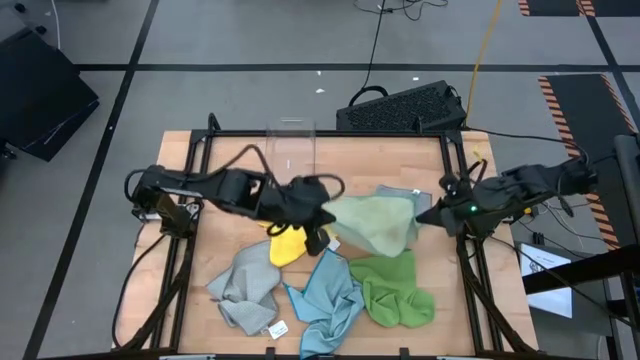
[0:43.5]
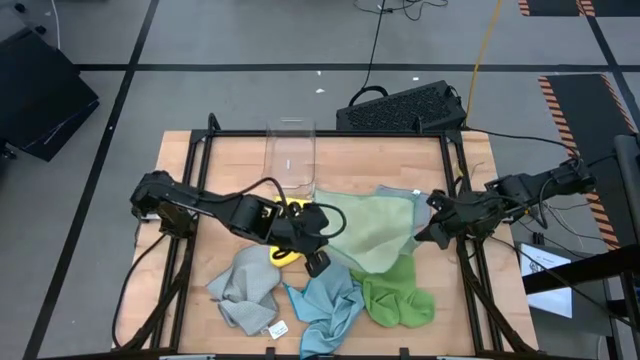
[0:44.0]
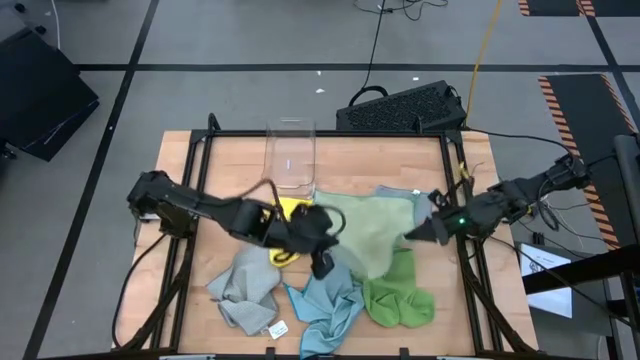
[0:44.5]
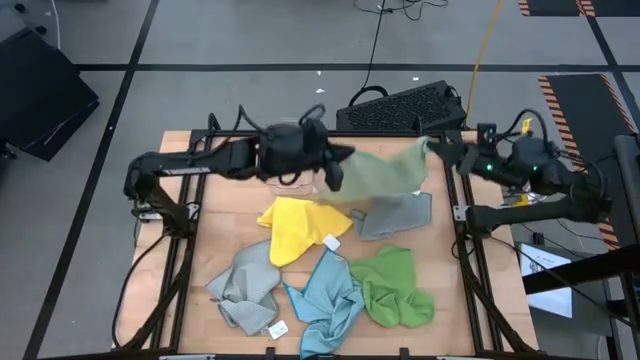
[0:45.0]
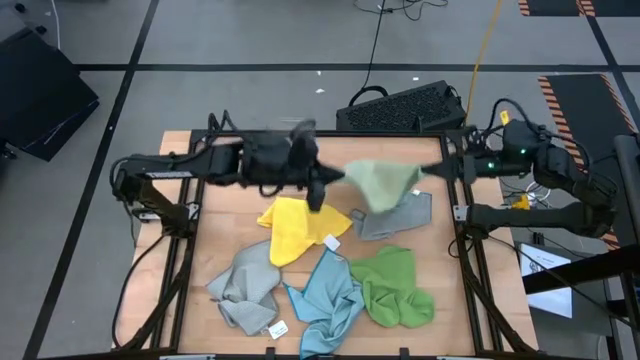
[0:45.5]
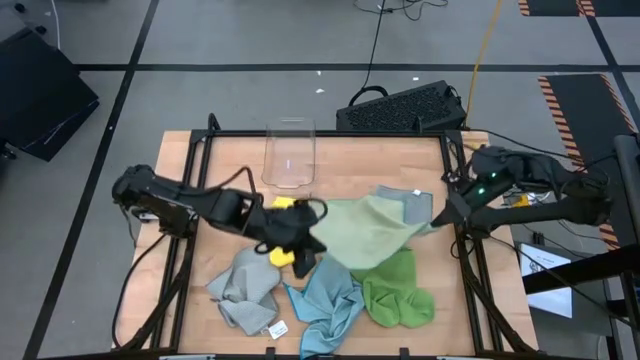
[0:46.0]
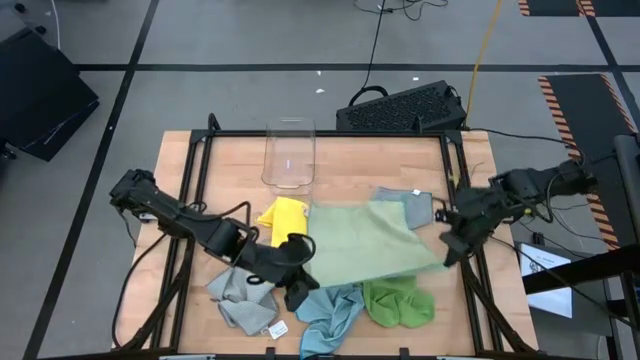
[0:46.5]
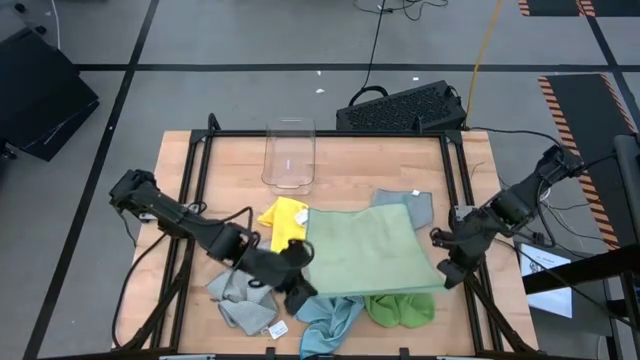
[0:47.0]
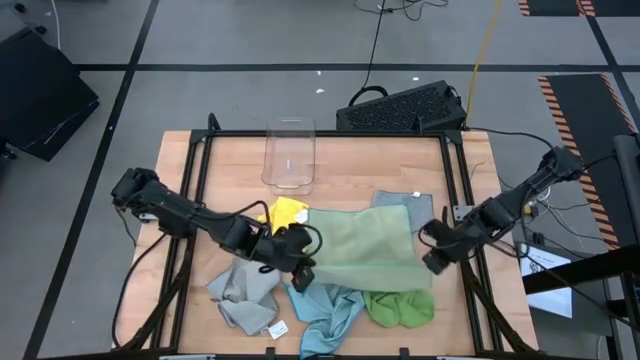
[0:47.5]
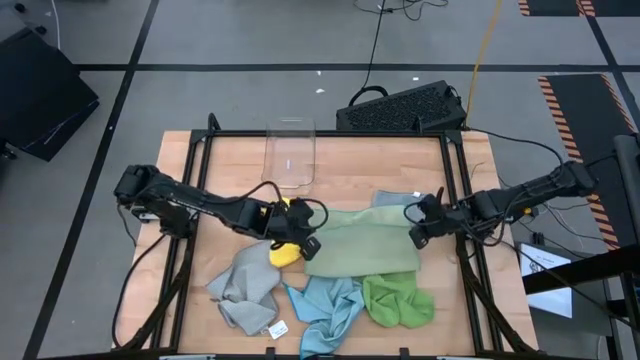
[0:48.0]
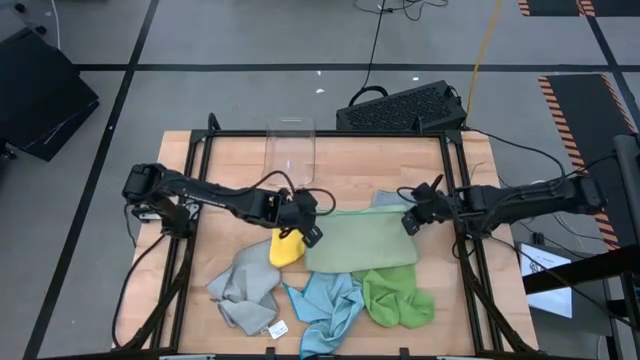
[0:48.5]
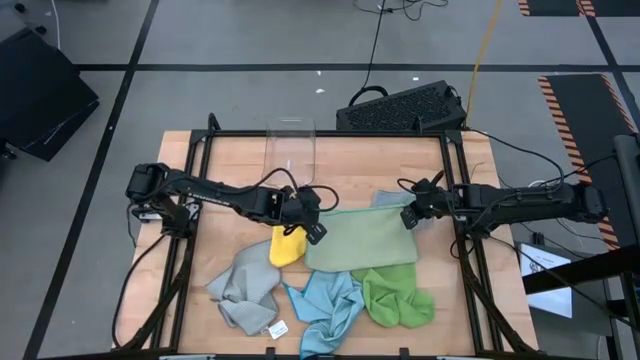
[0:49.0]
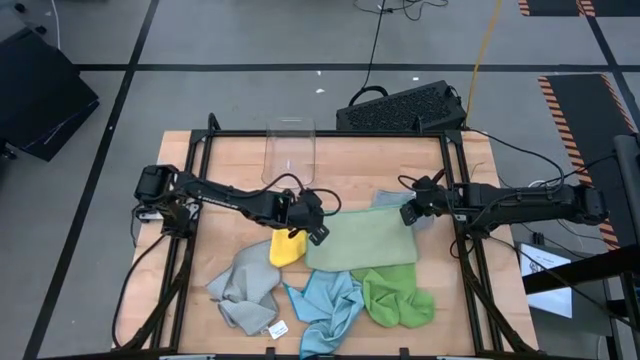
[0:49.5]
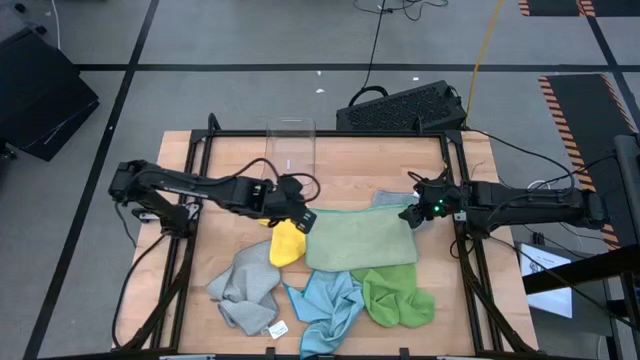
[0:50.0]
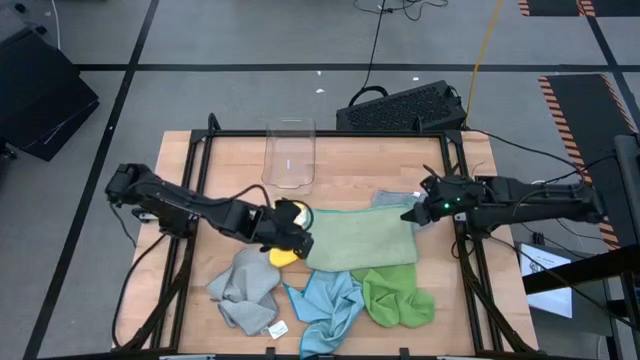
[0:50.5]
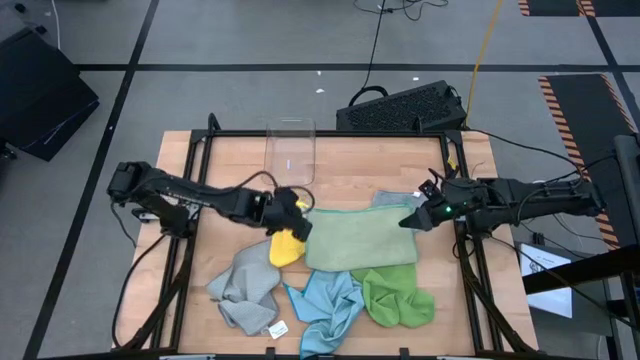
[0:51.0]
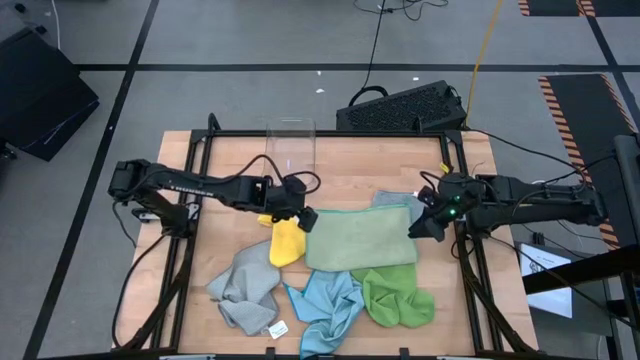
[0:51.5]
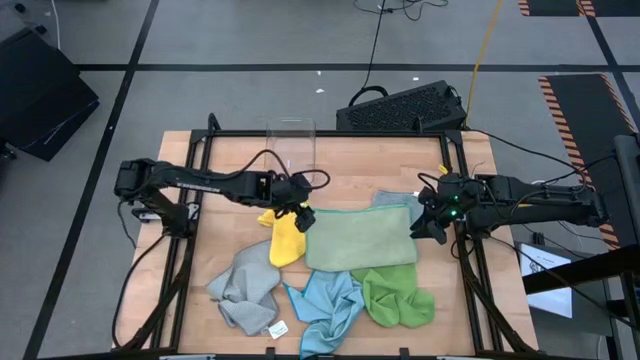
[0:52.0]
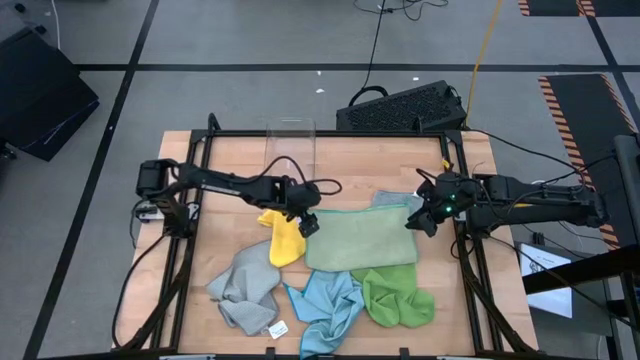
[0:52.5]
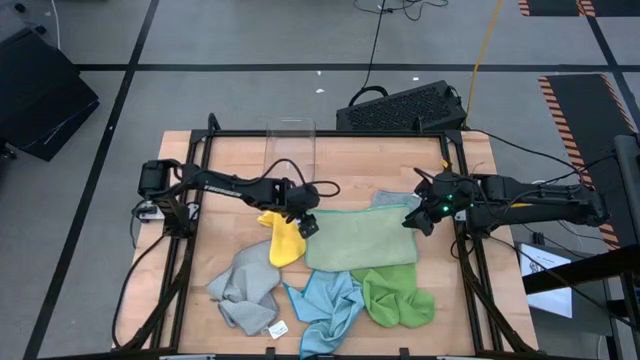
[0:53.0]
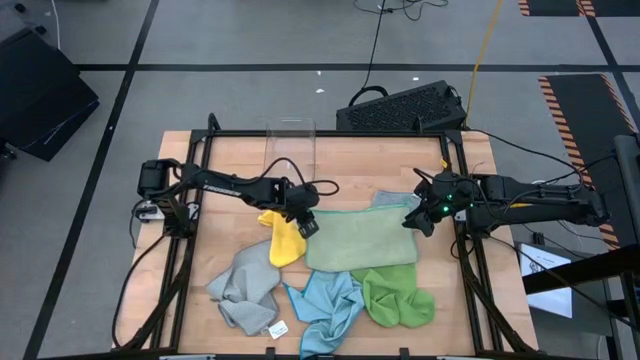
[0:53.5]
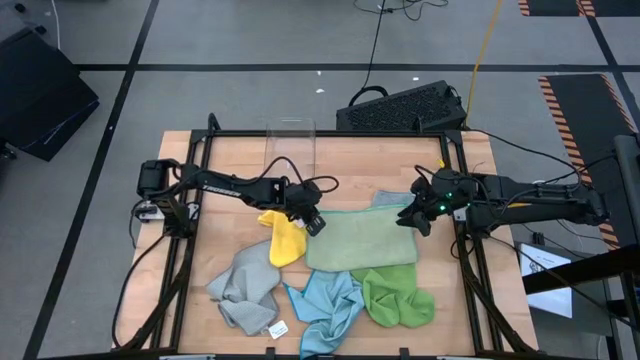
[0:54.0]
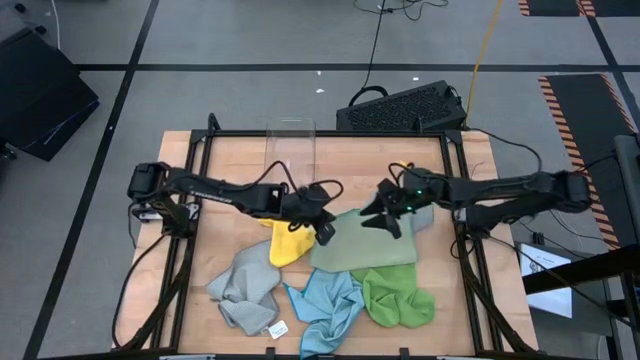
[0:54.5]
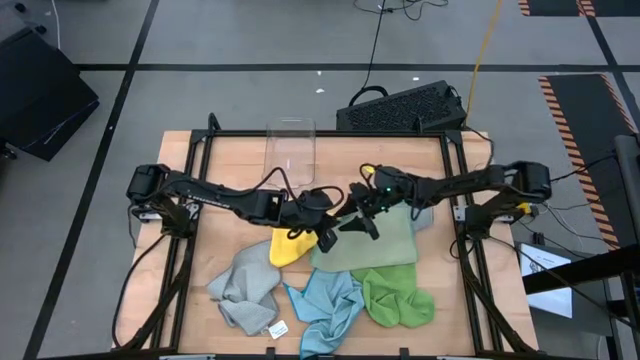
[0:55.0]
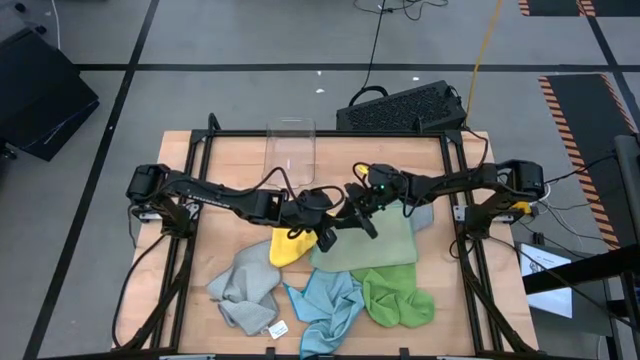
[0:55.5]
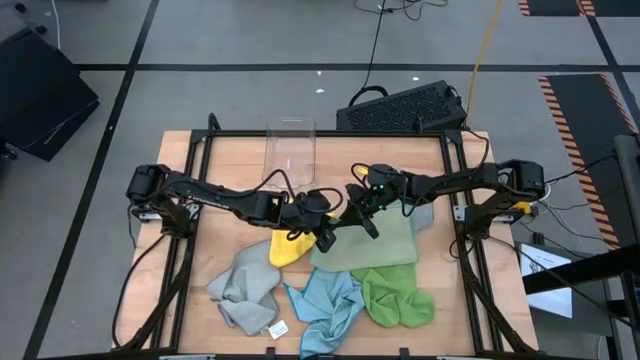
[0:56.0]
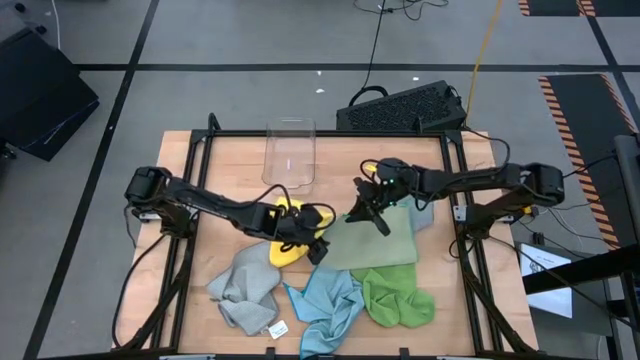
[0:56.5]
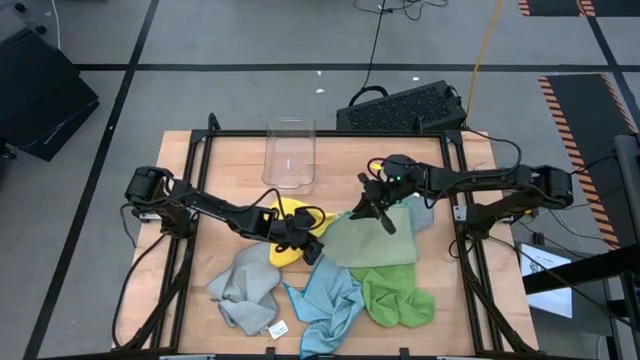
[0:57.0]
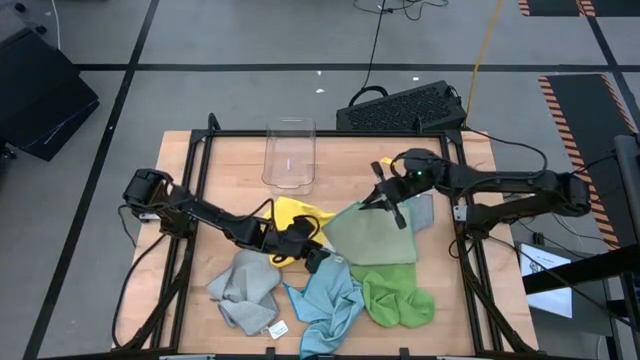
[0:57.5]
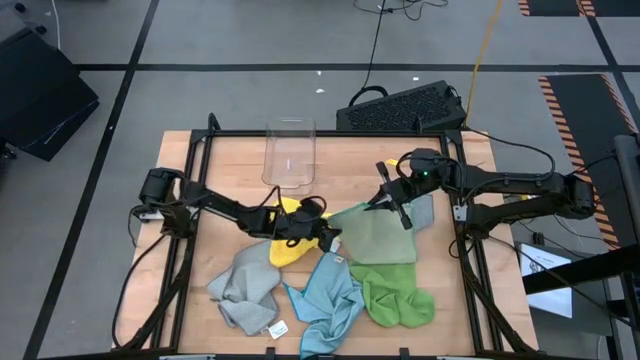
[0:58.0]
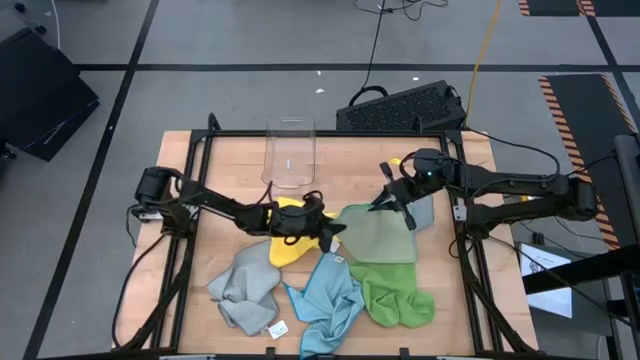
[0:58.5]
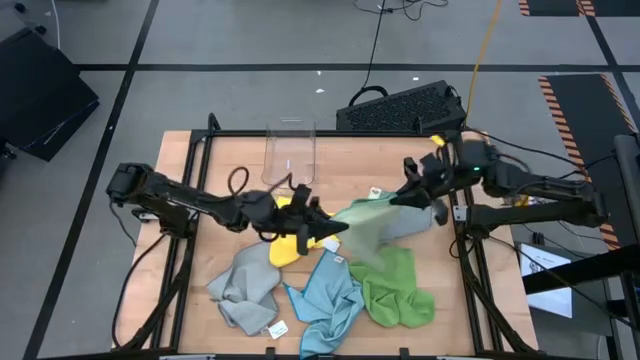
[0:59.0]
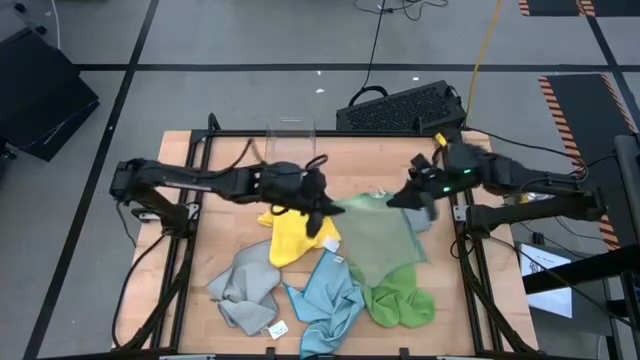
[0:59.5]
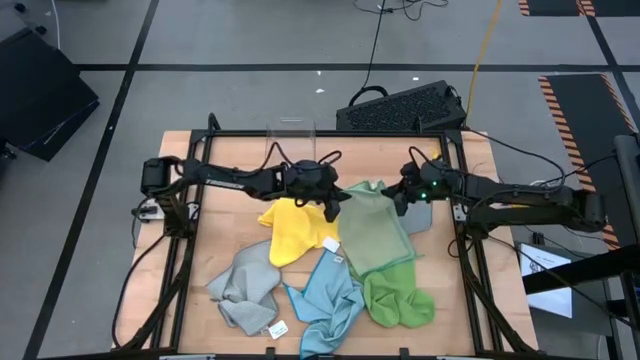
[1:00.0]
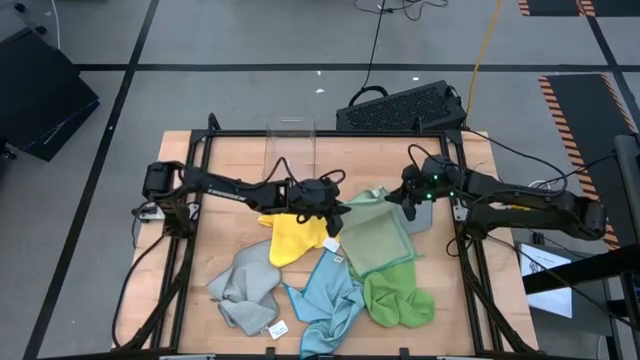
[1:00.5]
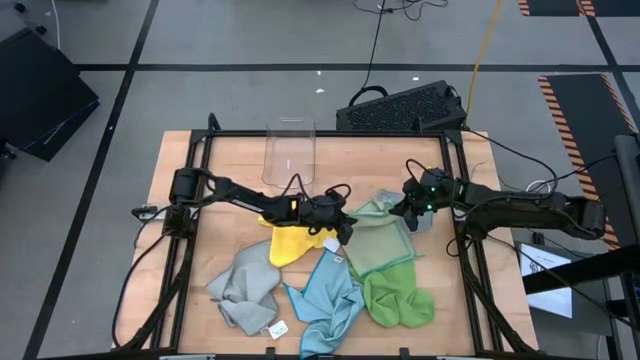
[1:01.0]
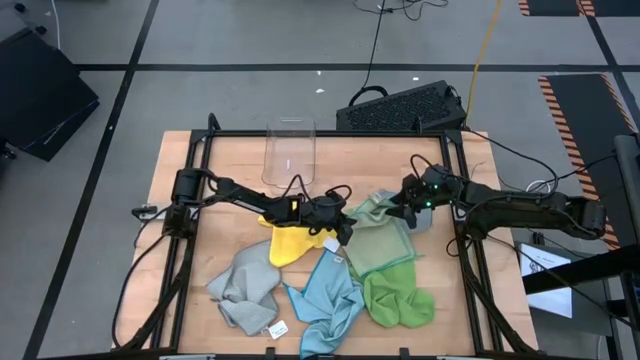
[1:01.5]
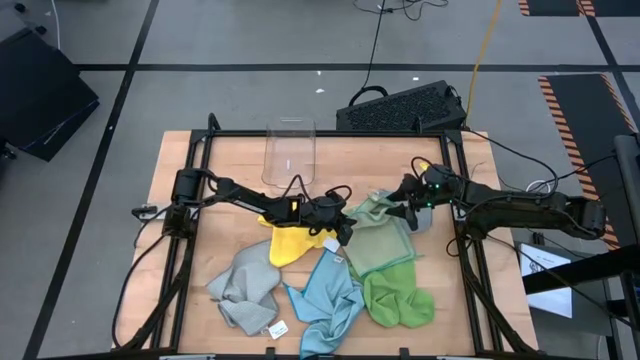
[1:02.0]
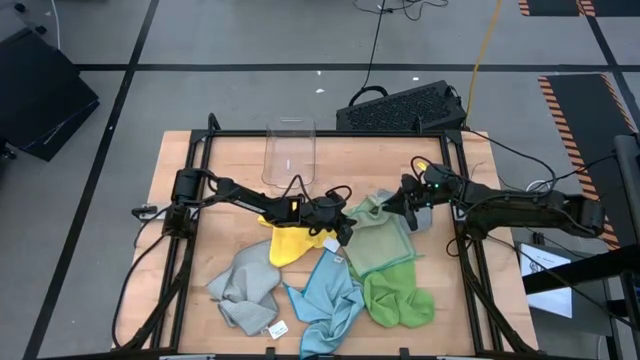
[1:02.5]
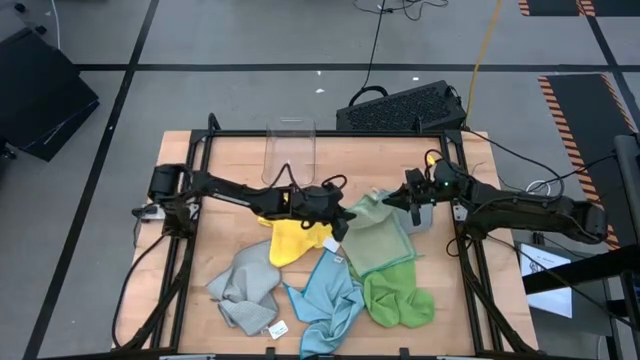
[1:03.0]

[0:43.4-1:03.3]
Task: Fold microfiber towels
Fold the light green microfiber cloth
